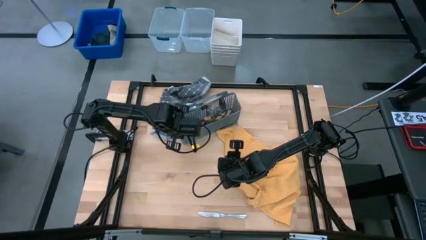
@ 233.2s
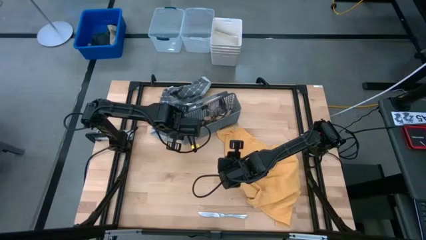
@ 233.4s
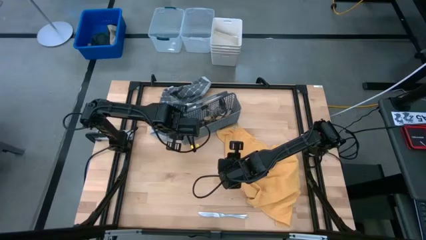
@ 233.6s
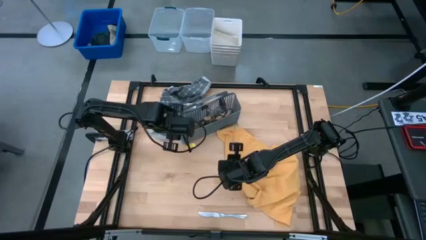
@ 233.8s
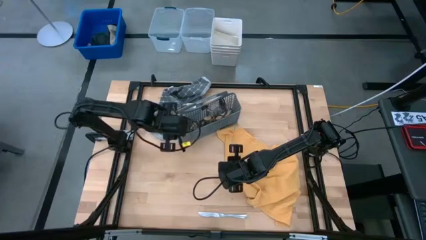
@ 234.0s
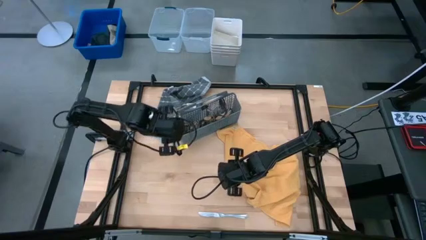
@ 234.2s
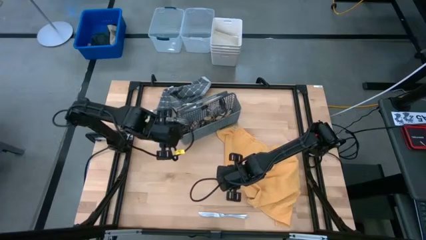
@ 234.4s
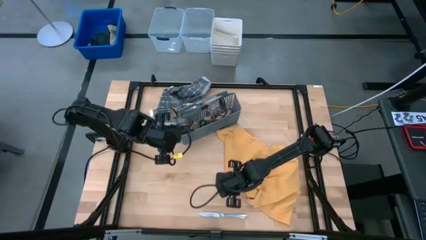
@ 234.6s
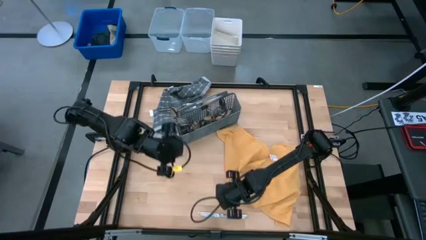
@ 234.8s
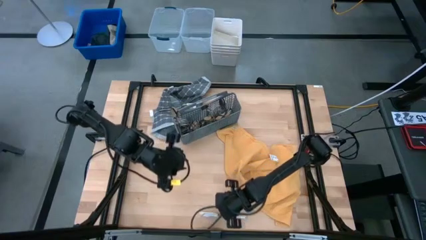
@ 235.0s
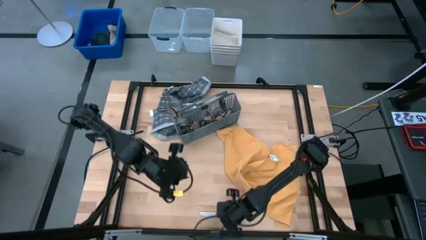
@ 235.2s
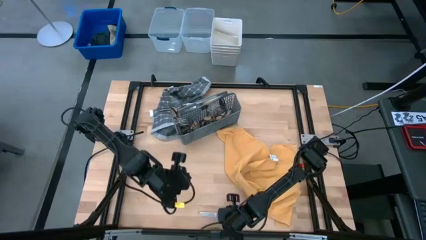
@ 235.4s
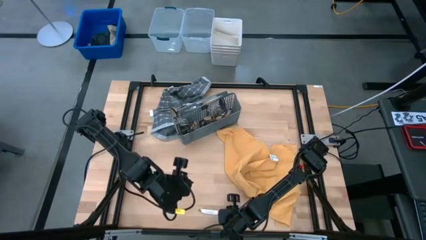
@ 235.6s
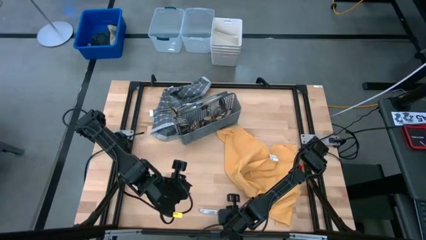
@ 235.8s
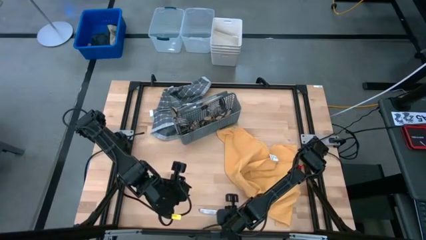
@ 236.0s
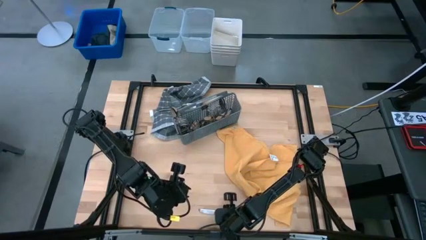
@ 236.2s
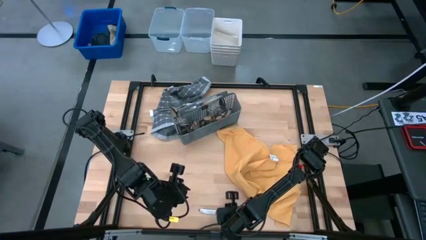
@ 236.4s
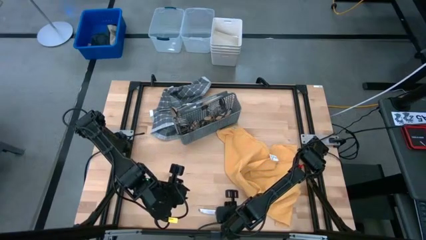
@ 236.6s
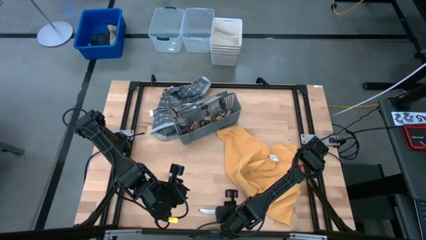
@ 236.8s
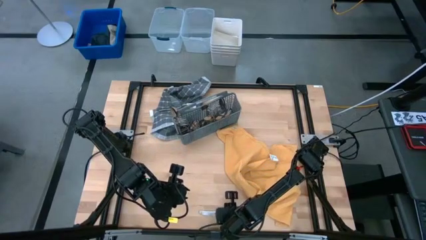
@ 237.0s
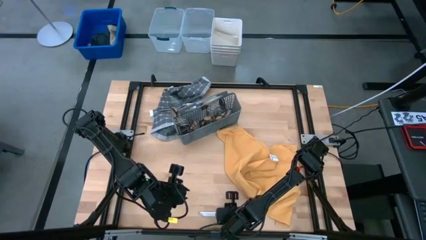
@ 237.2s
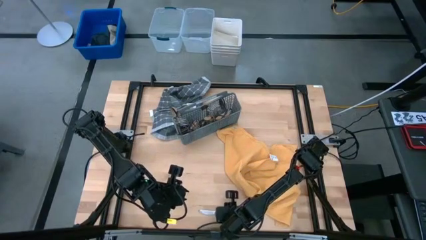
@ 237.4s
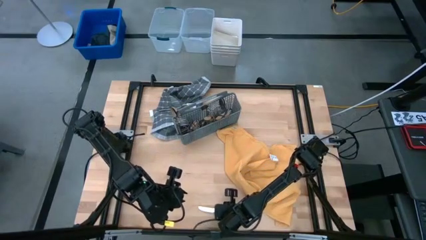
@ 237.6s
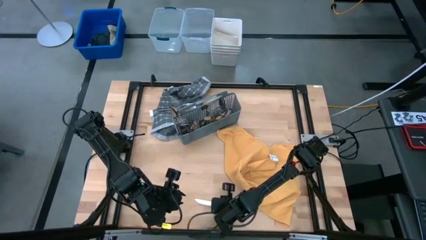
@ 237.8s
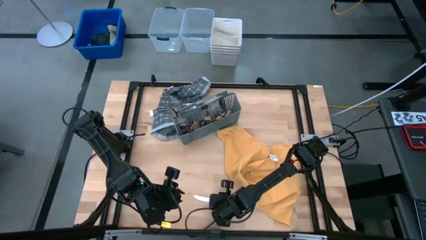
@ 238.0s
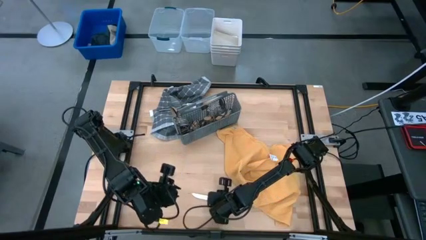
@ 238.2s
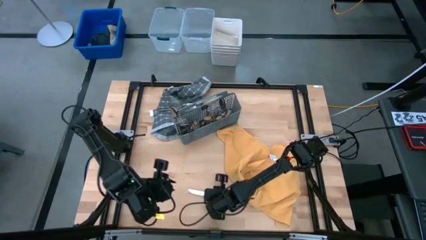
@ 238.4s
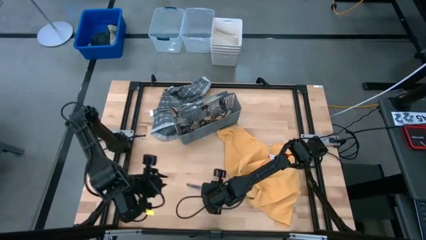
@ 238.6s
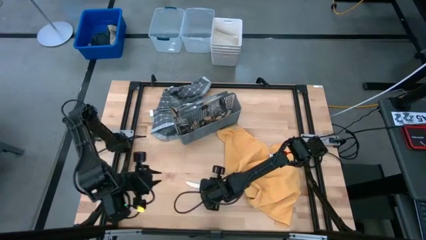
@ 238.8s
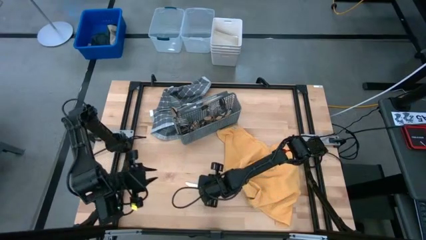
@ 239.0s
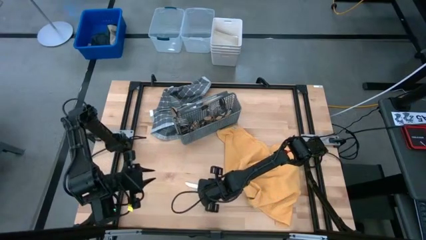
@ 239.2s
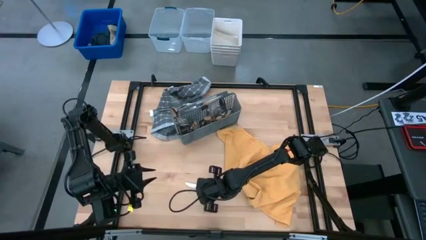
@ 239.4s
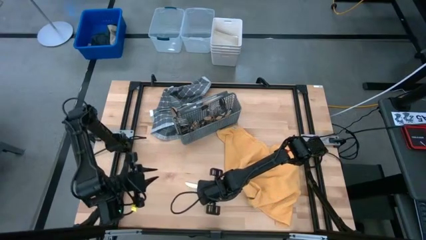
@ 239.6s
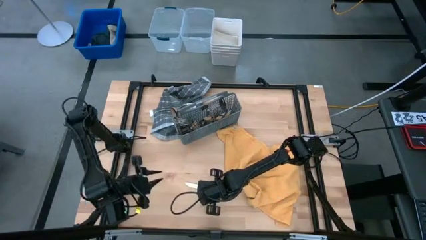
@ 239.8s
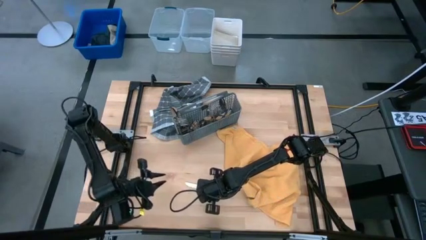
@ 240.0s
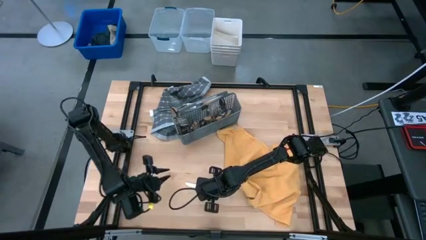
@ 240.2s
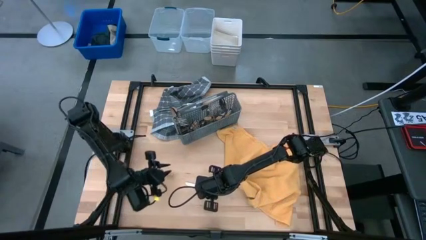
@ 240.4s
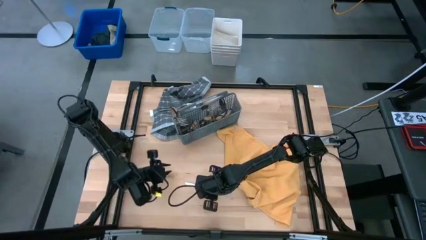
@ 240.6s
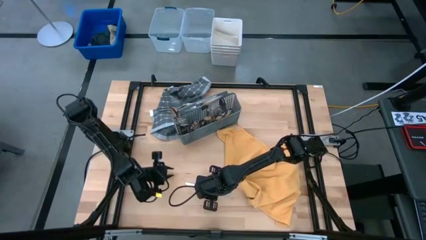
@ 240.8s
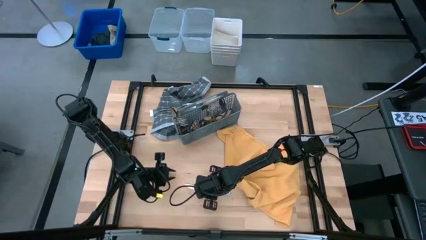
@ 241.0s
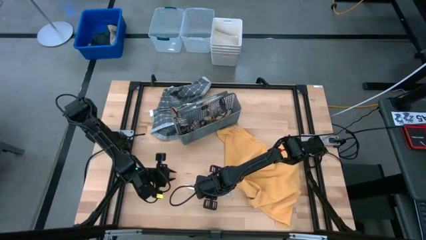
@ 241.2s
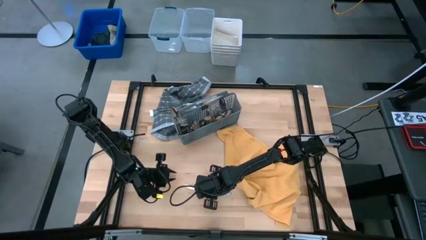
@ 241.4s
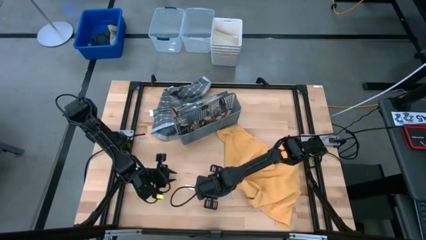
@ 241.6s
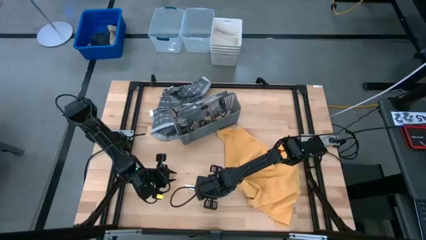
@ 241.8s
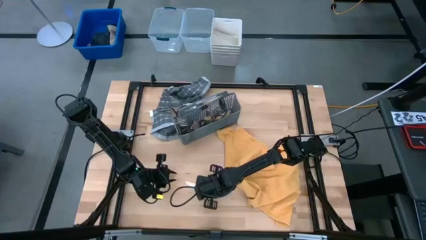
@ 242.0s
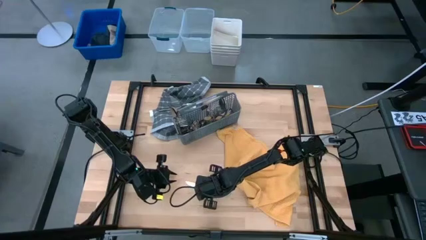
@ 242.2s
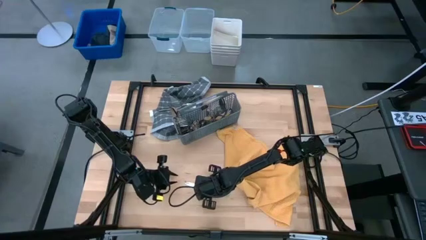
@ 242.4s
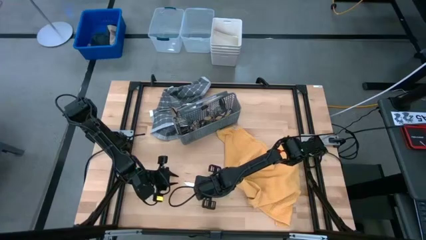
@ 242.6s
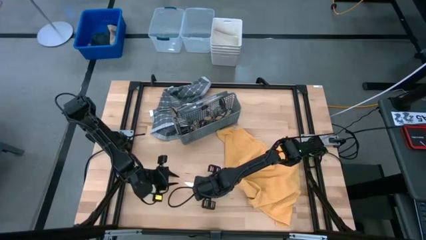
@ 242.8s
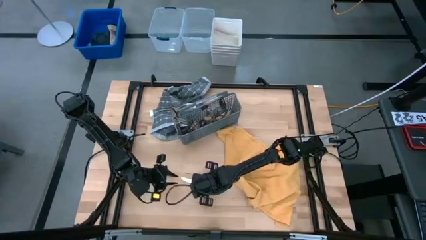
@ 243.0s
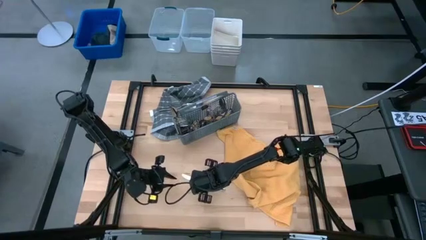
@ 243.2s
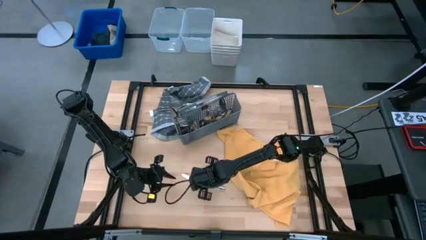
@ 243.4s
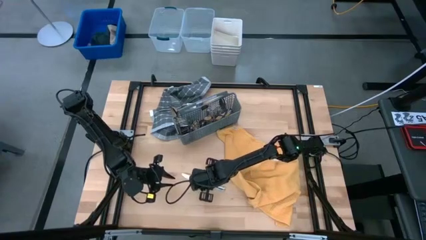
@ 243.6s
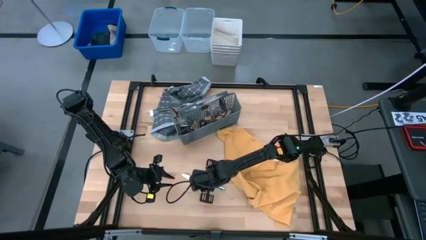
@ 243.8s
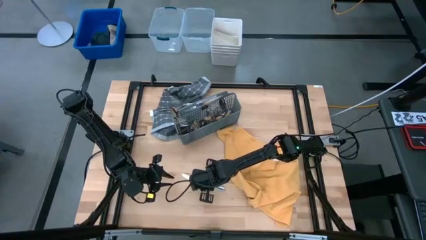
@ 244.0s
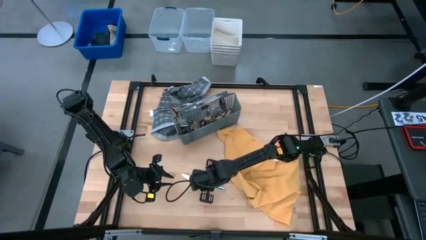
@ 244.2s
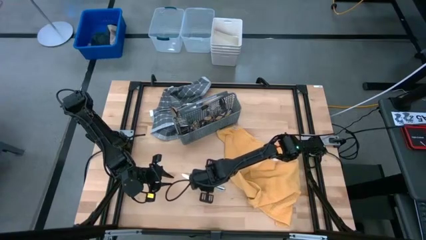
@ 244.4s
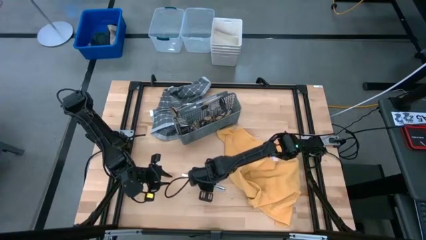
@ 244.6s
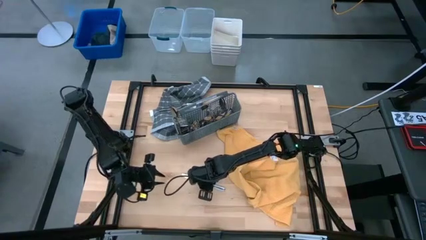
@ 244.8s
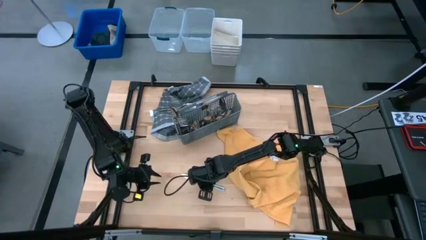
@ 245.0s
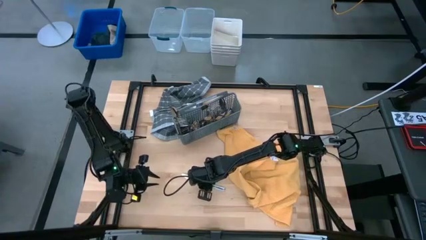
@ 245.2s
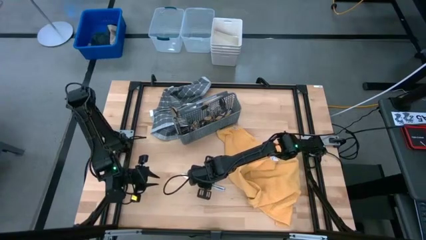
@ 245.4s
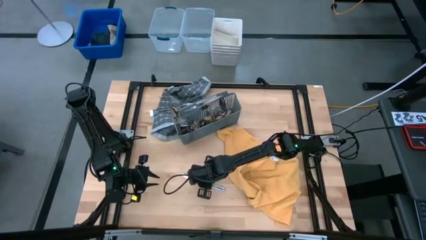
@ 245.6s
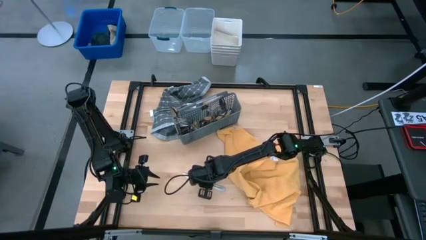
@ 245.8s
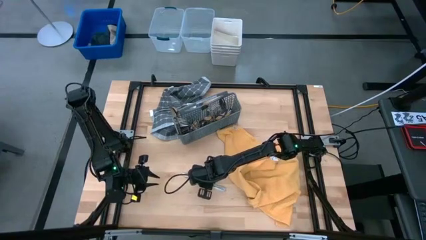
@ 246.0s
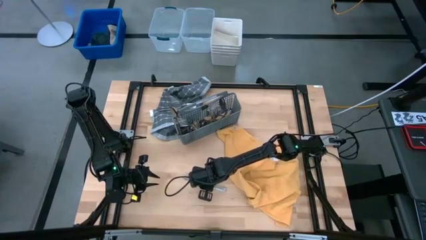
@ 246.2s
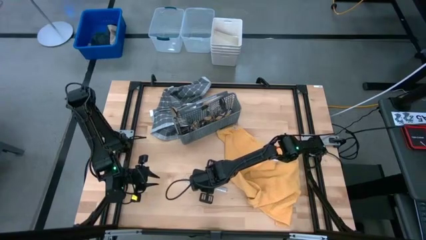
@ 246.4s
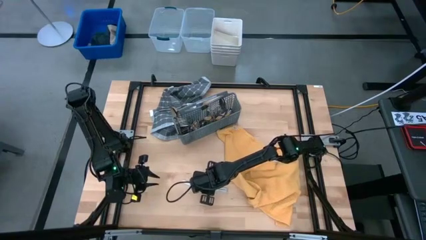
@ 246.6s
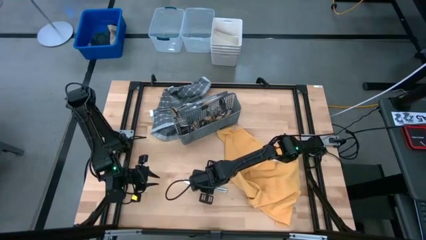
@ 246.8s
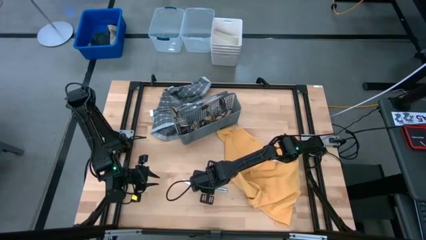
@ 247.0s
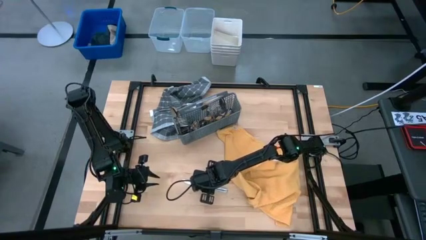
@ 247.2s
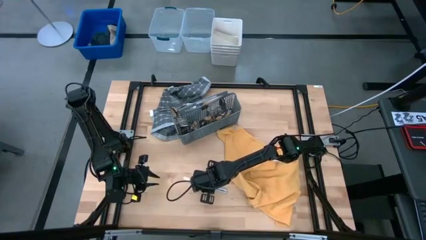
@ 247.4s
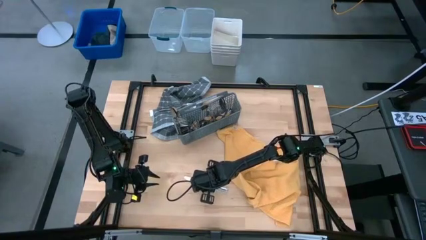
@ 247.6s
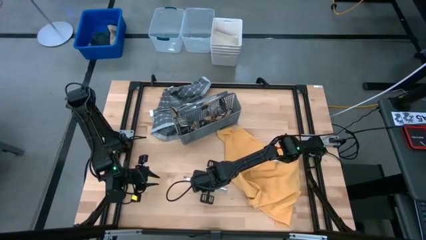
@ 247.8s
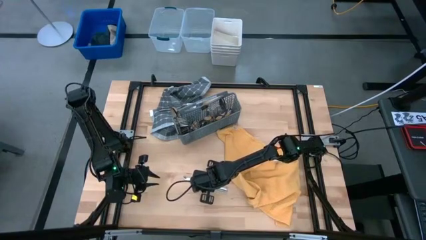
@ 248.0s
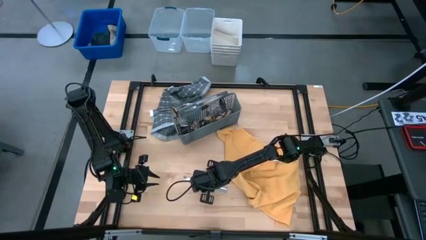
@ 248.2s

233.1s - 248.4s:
Task: Sort silverware
Put the silver knife into the gray silverware basket
